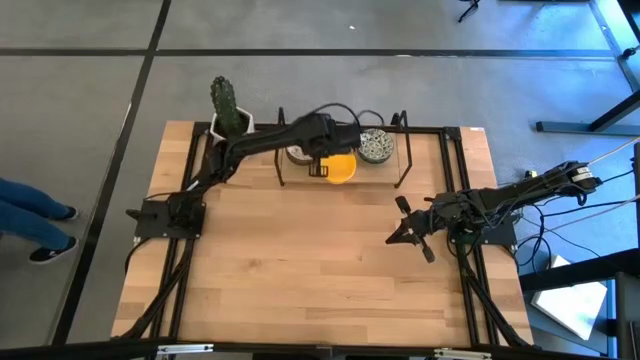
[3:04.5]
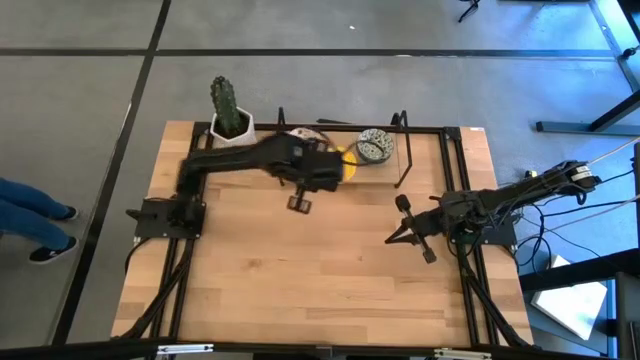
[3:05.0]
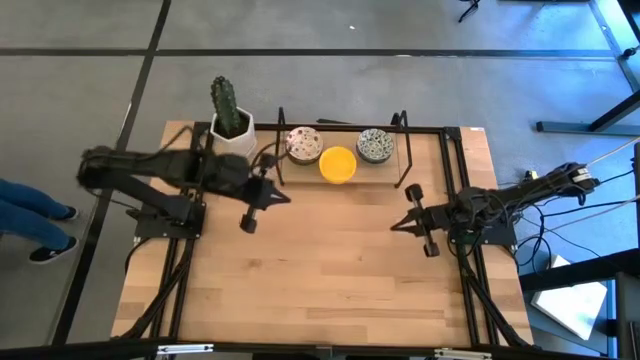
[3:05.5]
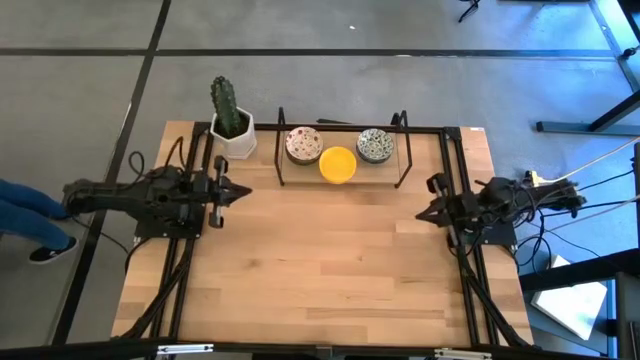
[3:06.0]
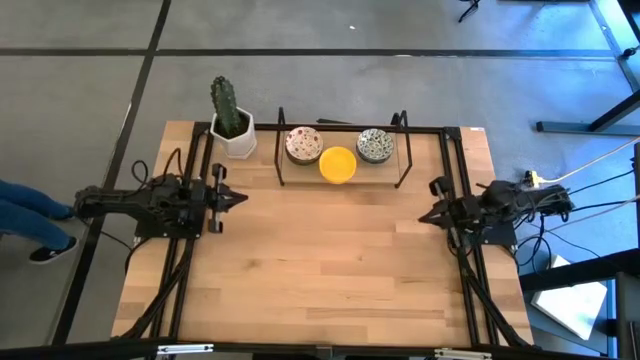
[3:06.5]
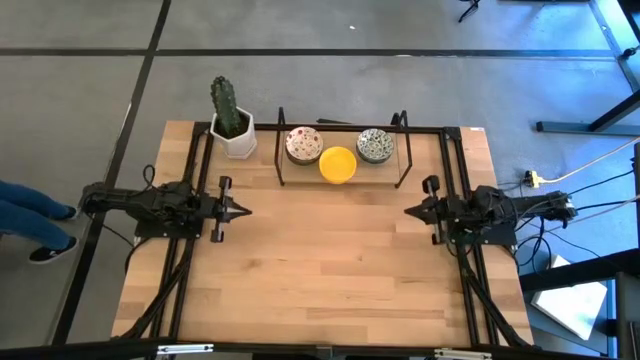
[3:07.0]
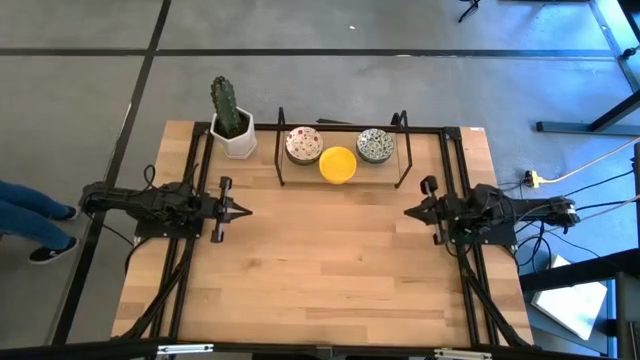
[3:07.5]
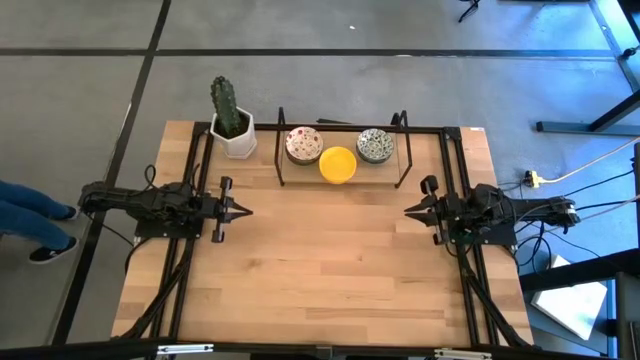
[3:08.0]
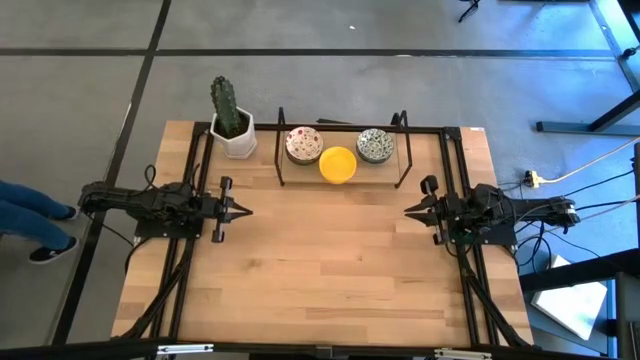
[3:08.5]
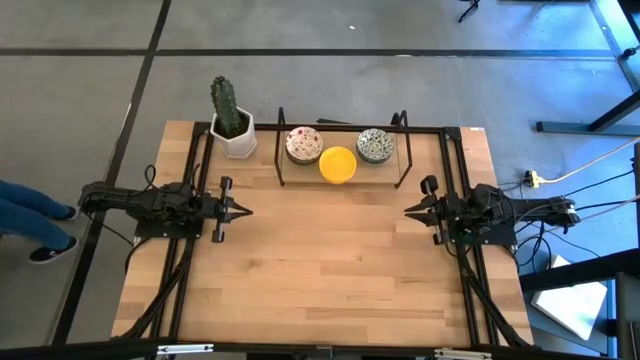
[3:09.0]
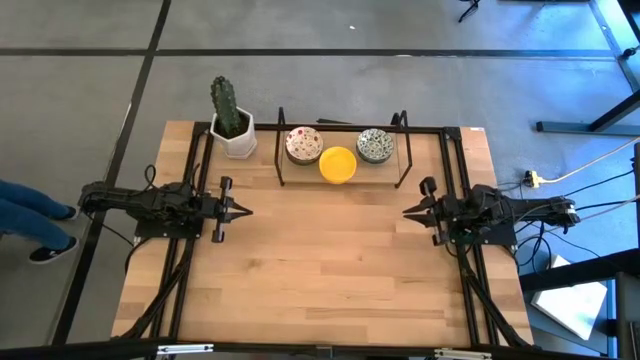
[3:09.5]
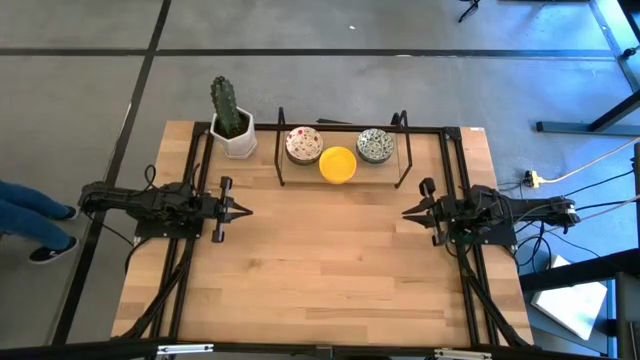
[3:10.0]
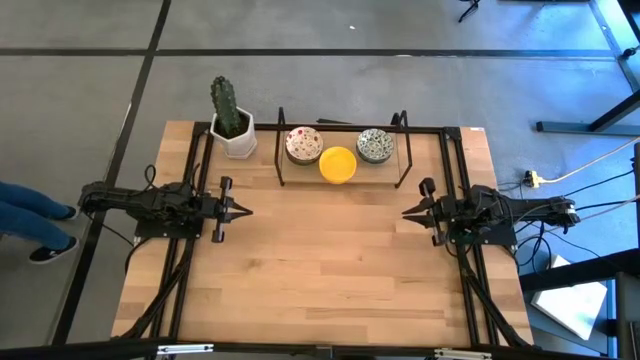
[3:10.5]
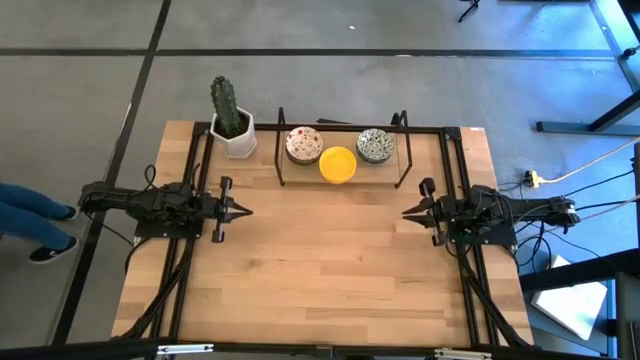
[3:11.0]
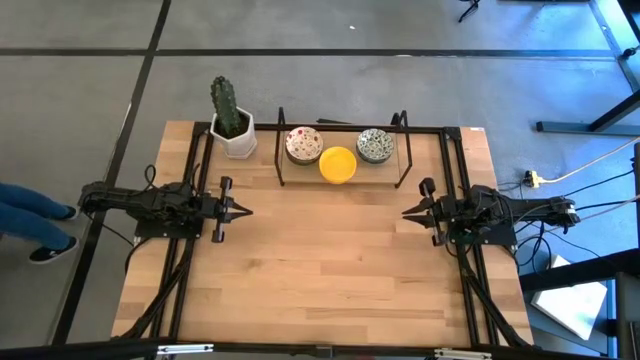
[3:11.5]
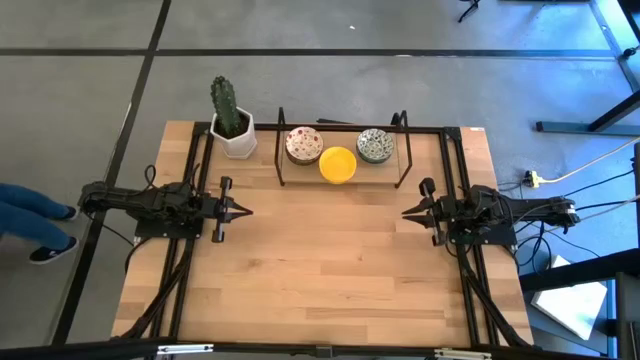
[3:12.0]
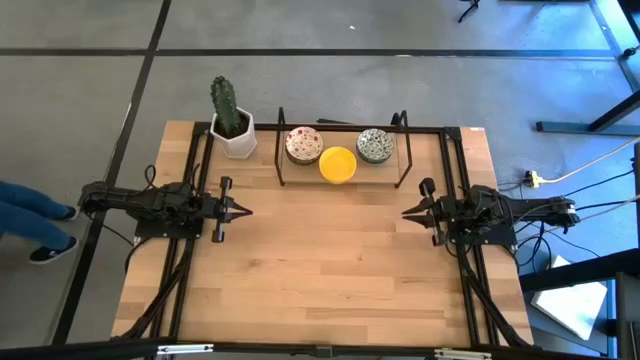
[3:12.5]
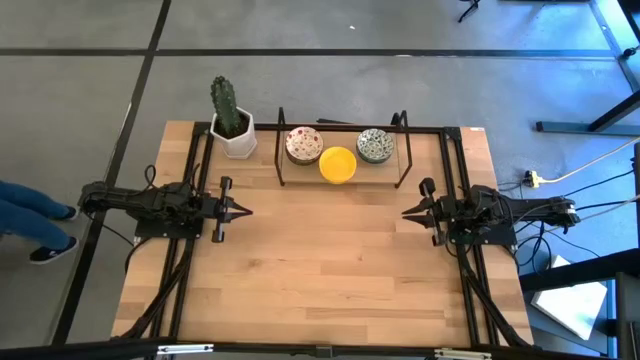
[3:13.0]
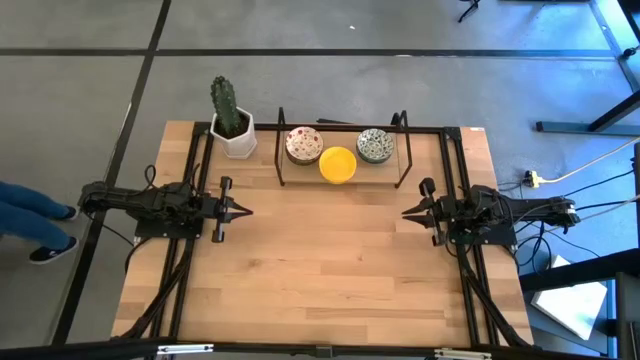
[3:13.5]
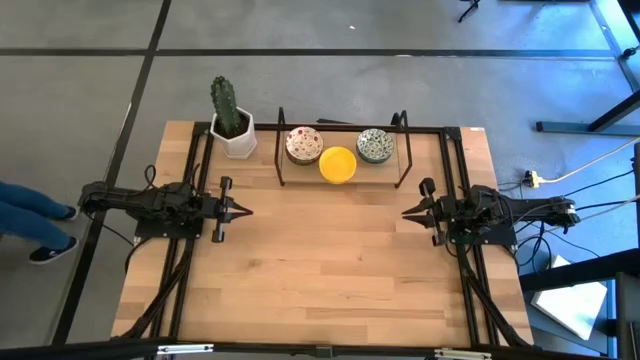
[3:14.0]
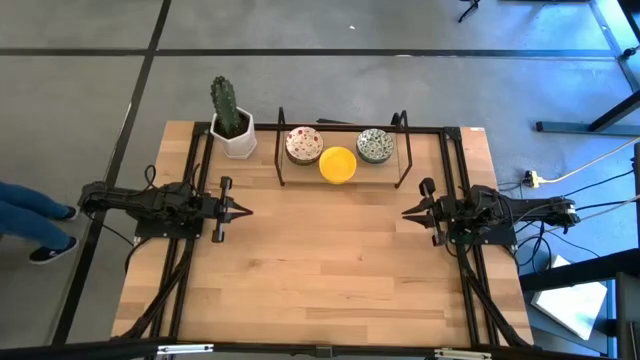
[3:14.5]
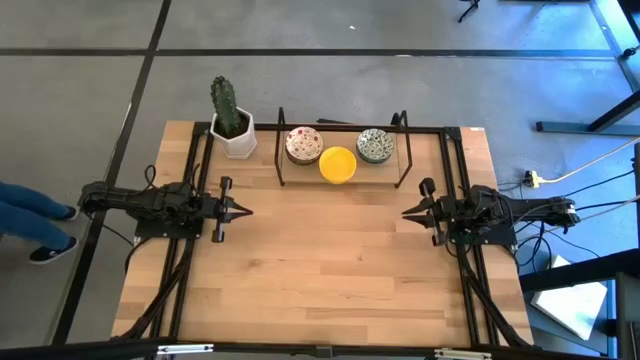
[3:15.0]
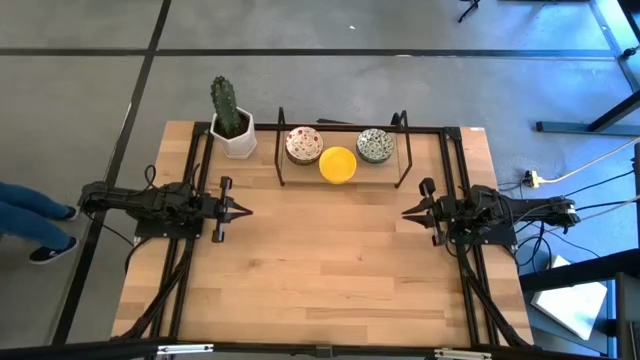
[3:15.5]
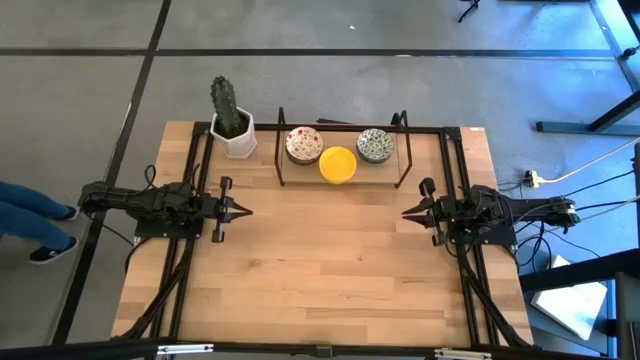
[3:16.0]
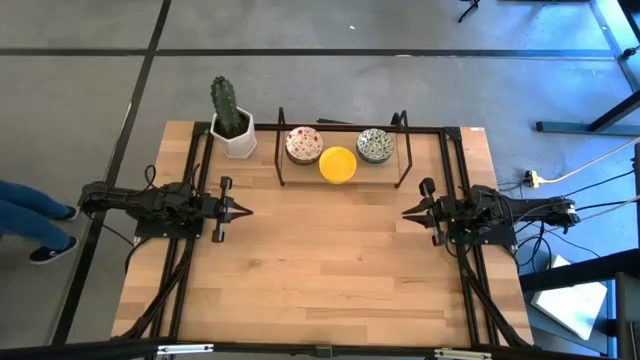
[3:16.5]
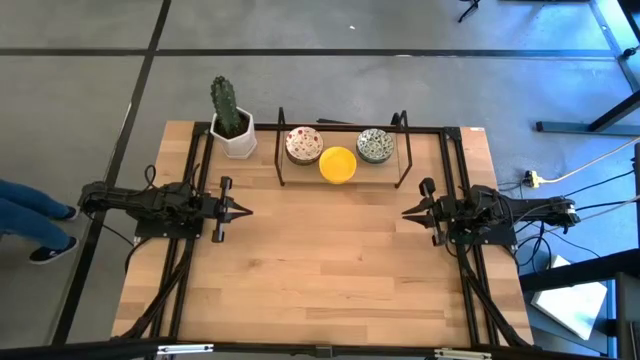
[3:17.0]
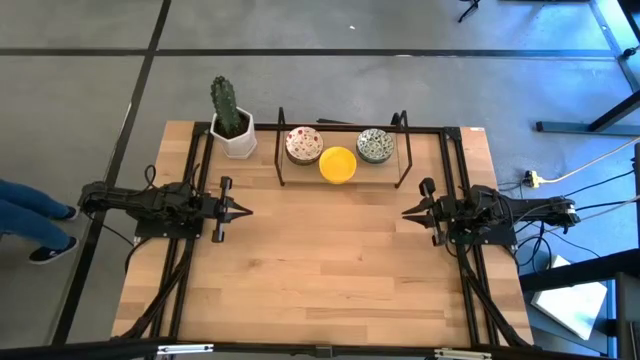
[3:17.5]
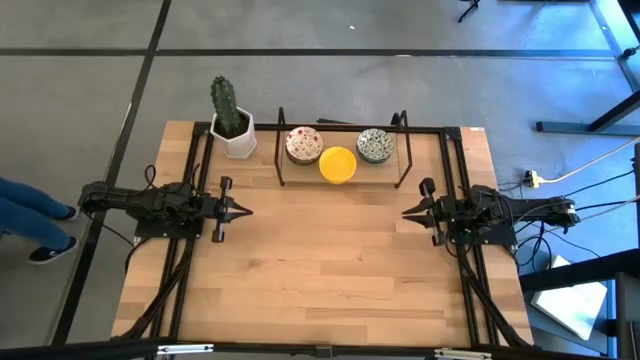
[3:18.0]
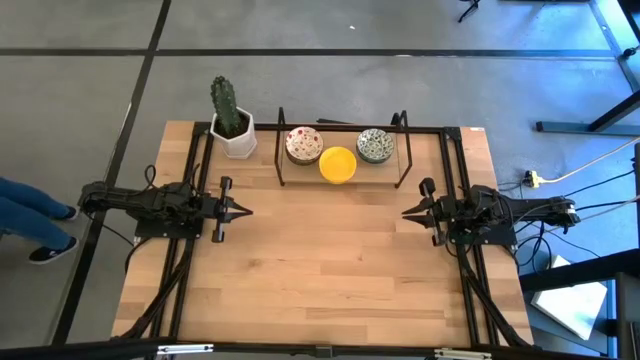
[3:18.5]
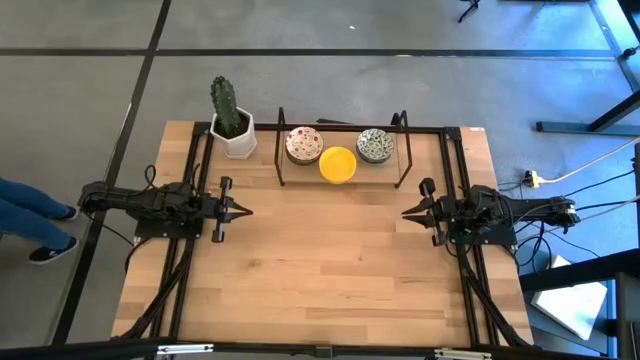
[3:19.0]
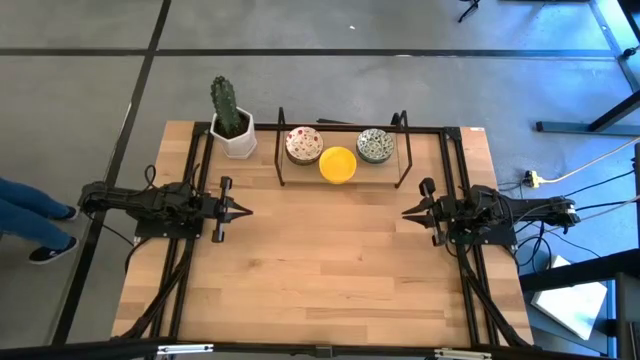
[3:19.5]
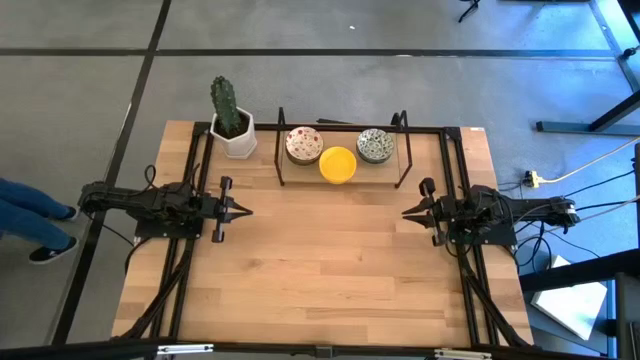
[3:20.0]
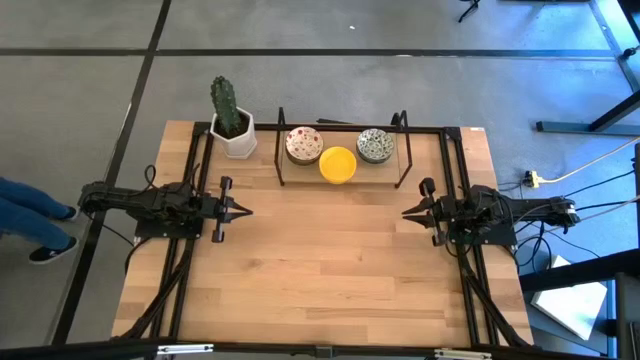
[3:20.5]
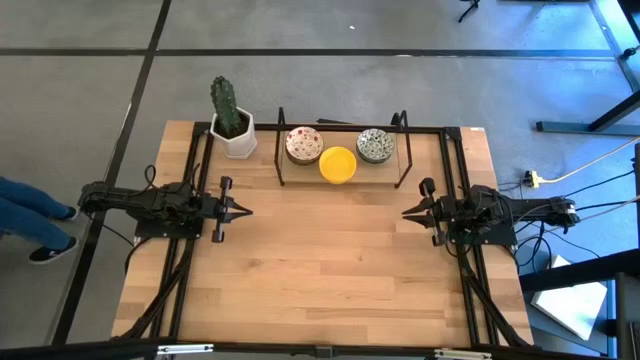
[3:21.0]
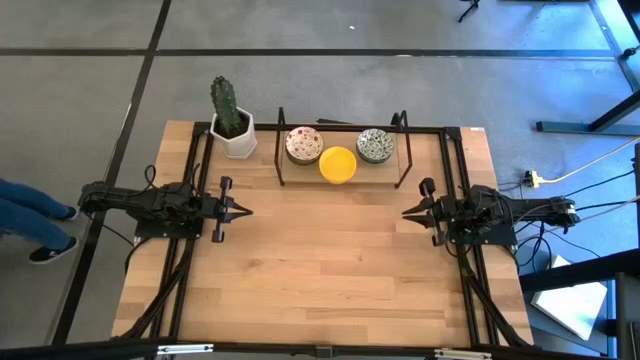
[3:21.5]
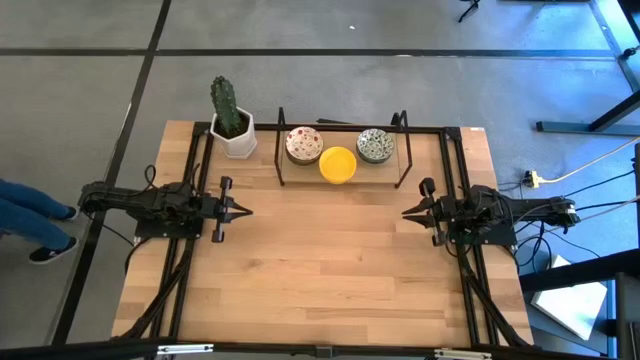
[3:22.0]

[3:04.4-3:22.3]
Task: Pick & Place Mini bowls
Return to Home Position
